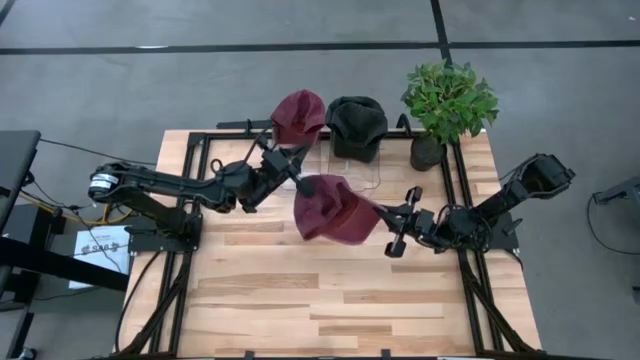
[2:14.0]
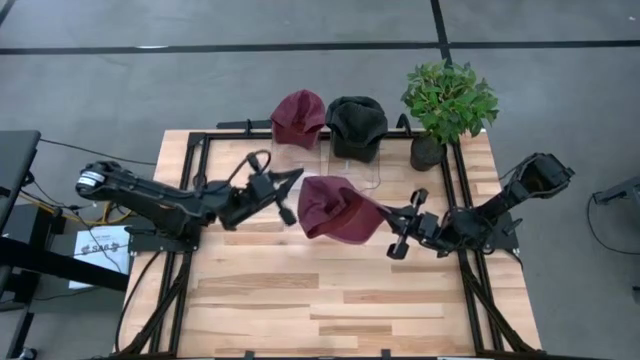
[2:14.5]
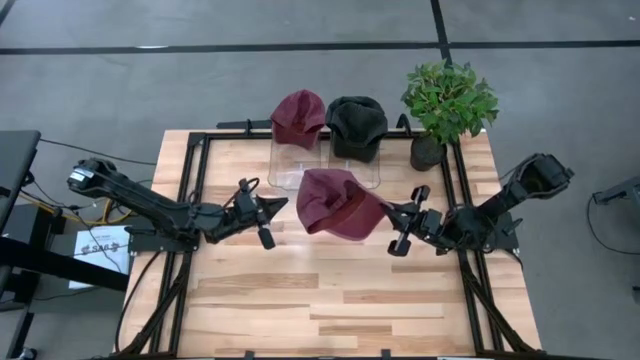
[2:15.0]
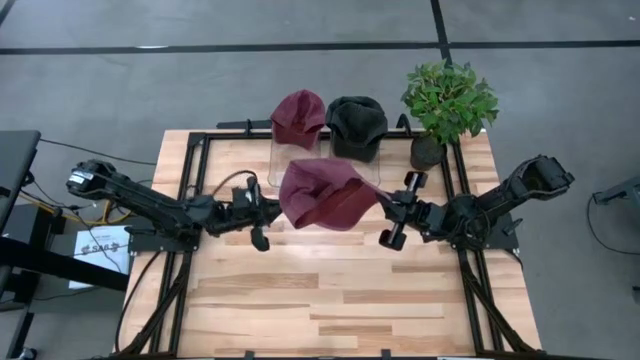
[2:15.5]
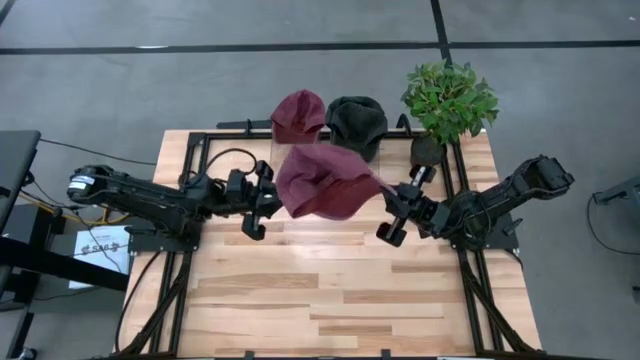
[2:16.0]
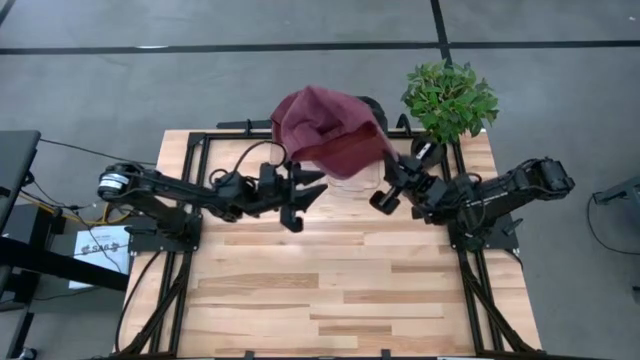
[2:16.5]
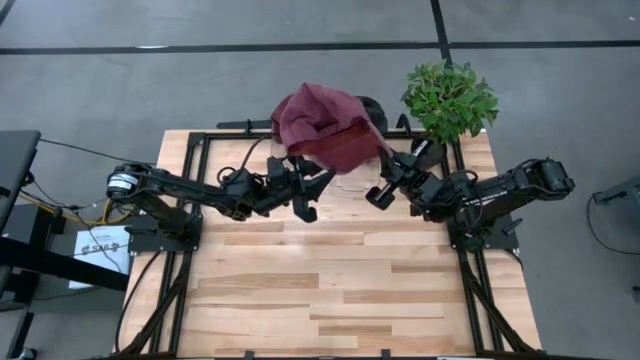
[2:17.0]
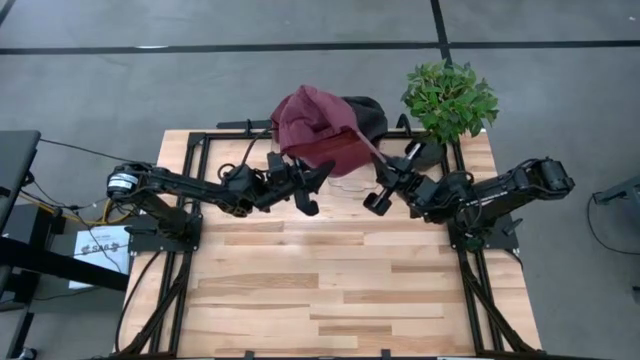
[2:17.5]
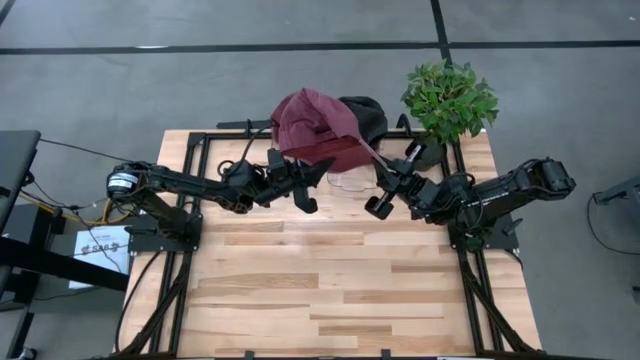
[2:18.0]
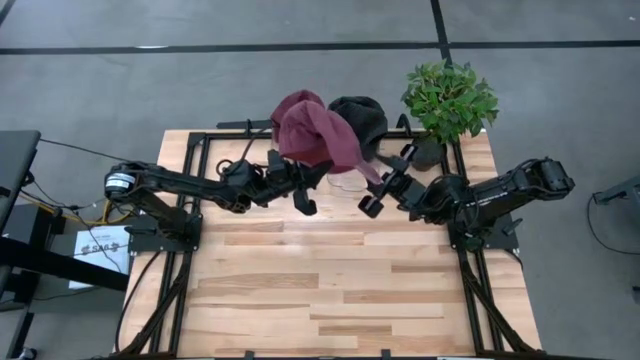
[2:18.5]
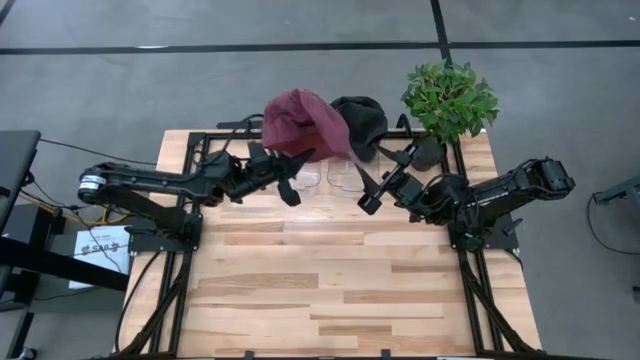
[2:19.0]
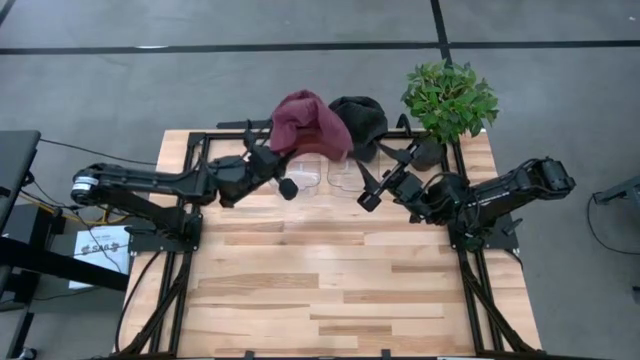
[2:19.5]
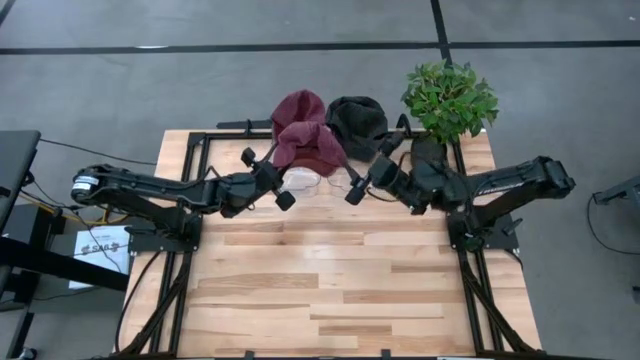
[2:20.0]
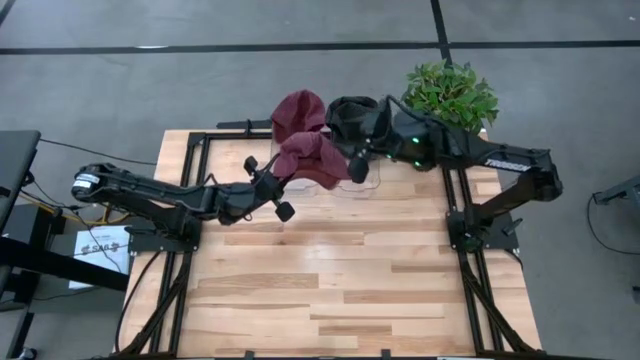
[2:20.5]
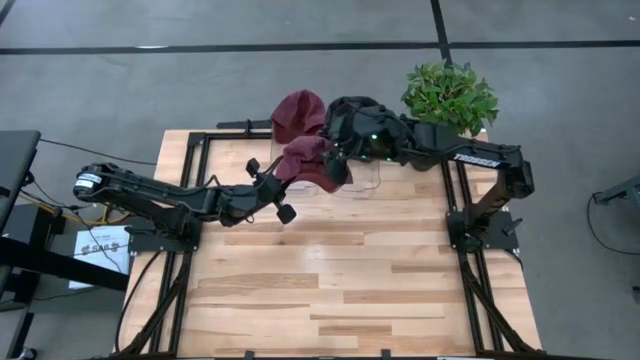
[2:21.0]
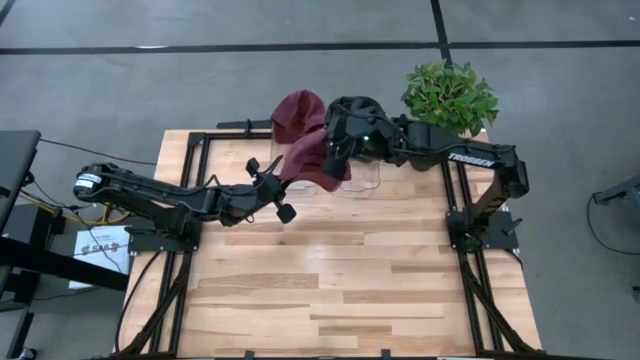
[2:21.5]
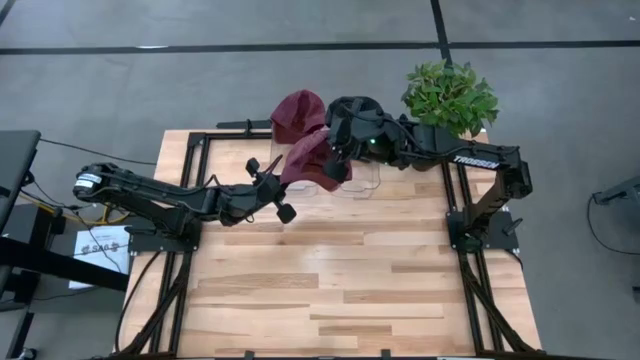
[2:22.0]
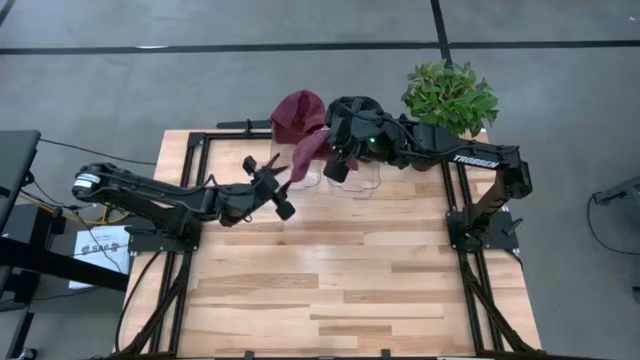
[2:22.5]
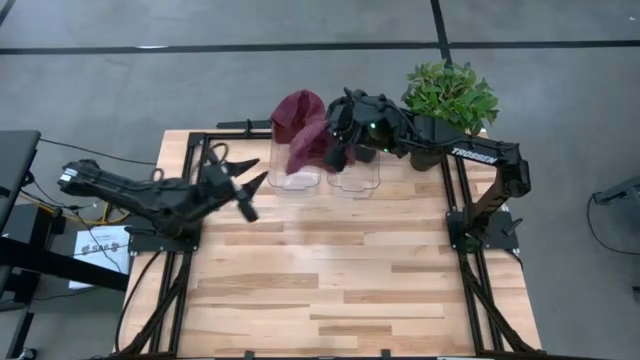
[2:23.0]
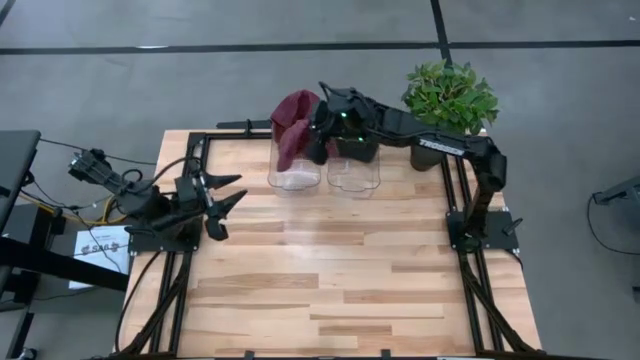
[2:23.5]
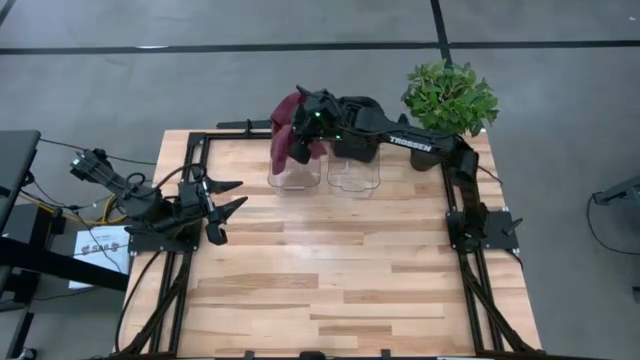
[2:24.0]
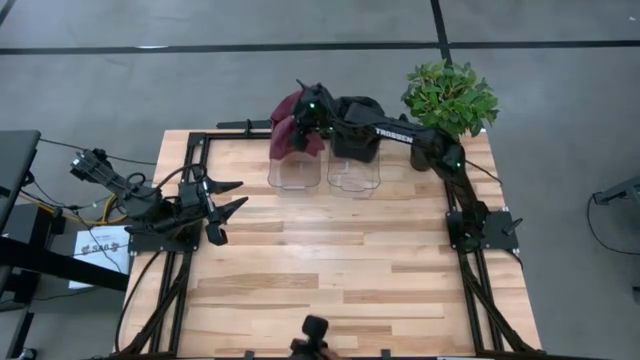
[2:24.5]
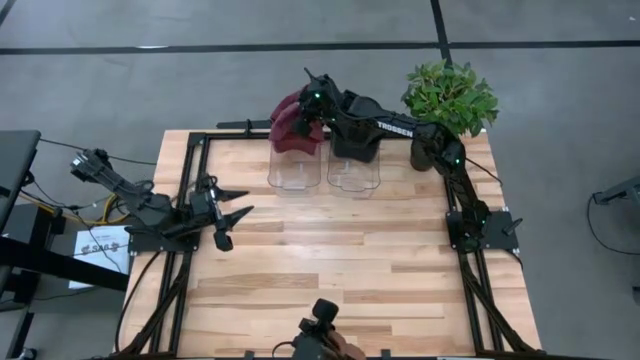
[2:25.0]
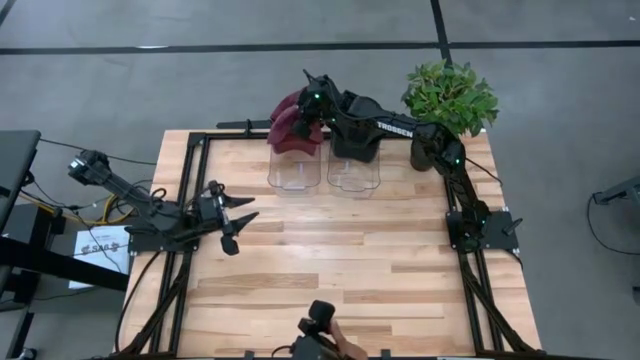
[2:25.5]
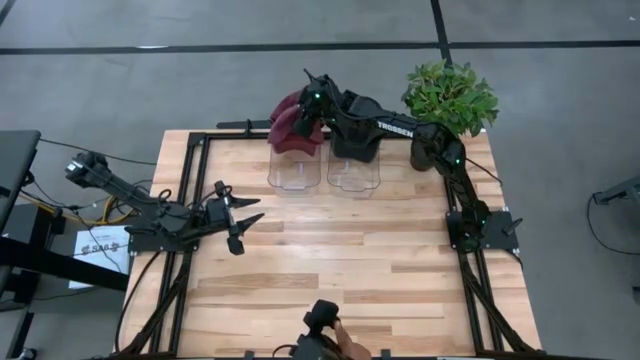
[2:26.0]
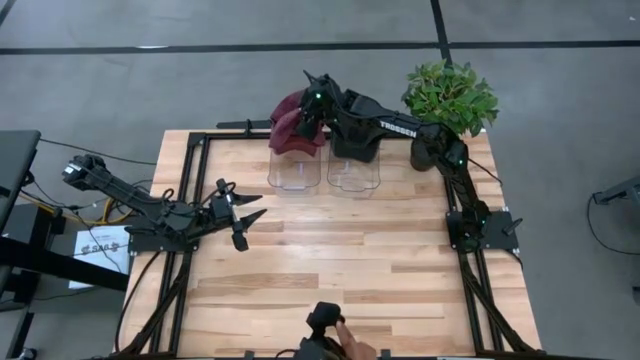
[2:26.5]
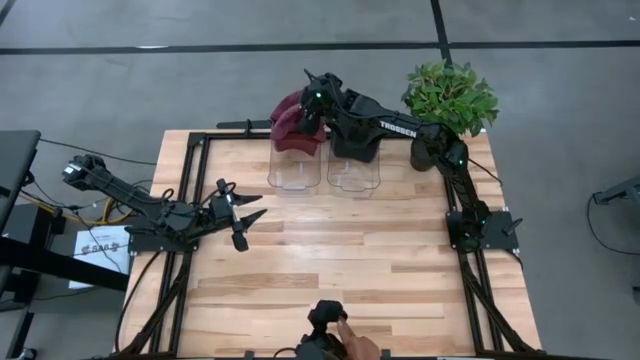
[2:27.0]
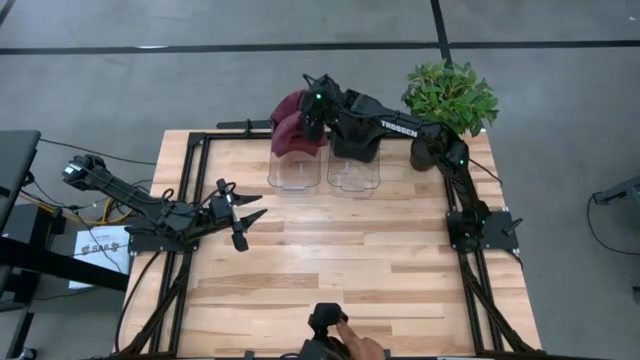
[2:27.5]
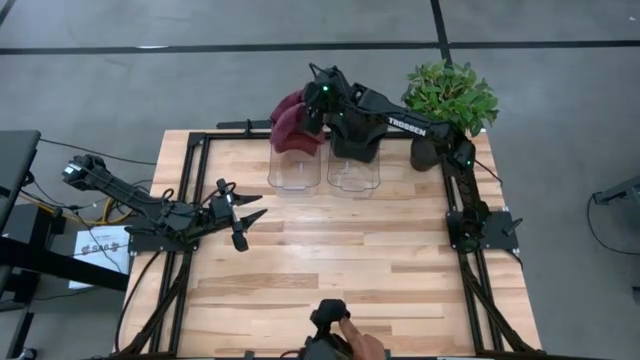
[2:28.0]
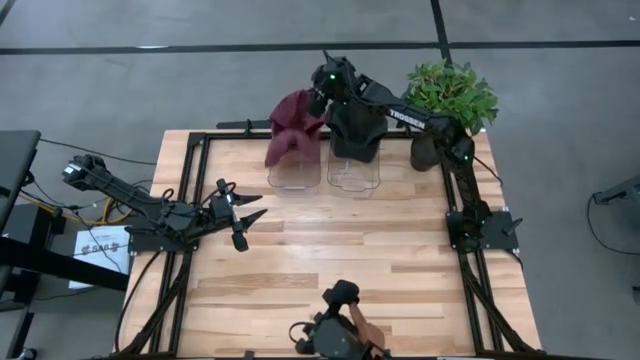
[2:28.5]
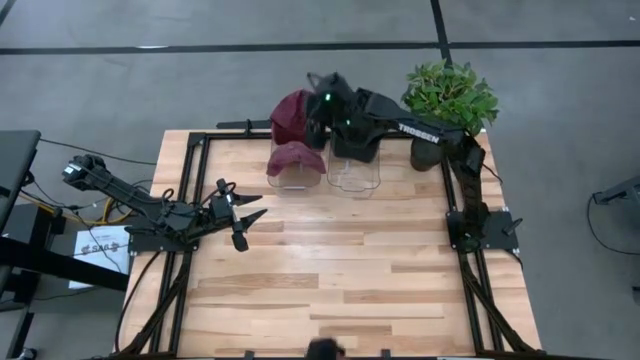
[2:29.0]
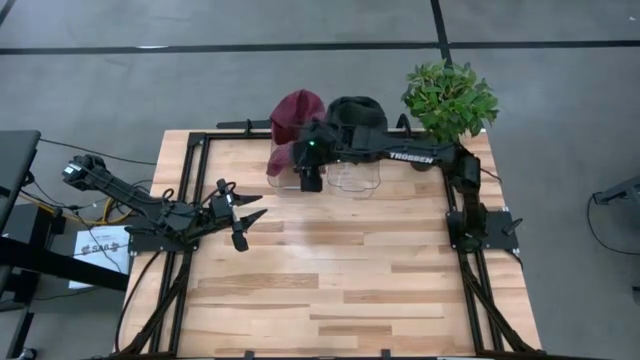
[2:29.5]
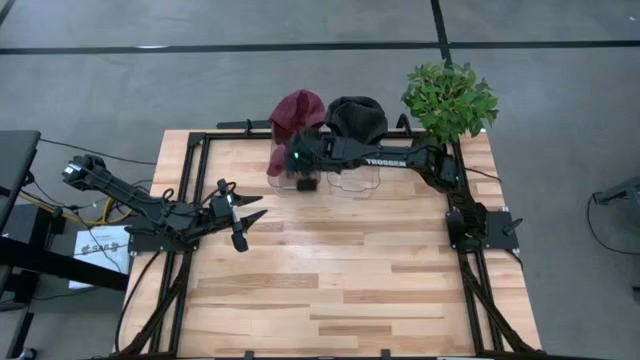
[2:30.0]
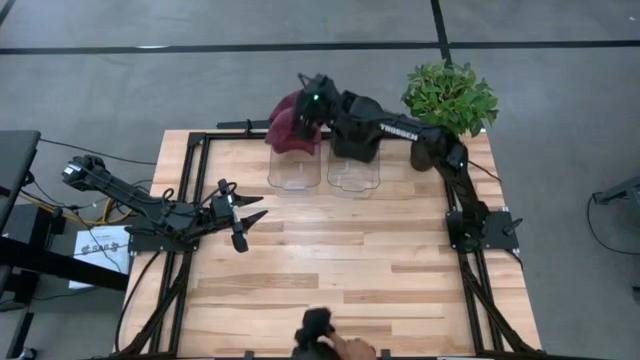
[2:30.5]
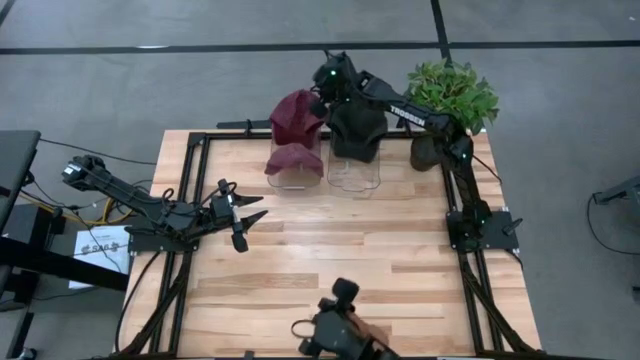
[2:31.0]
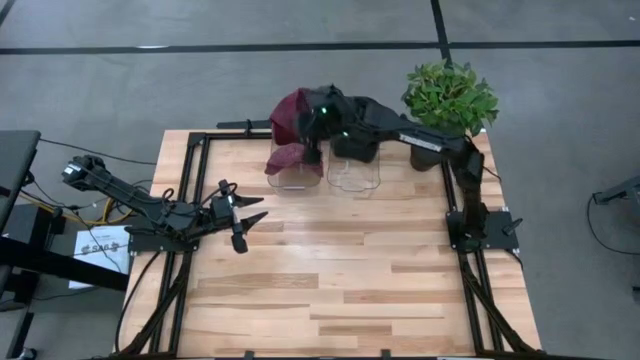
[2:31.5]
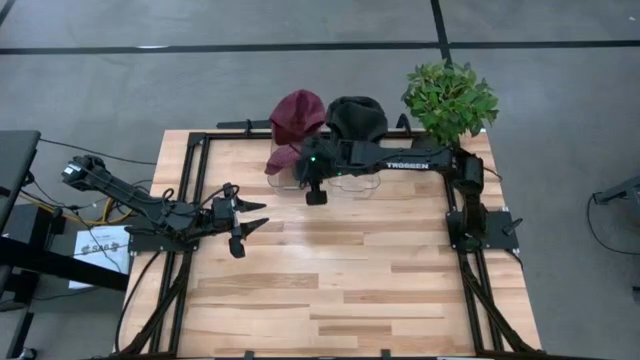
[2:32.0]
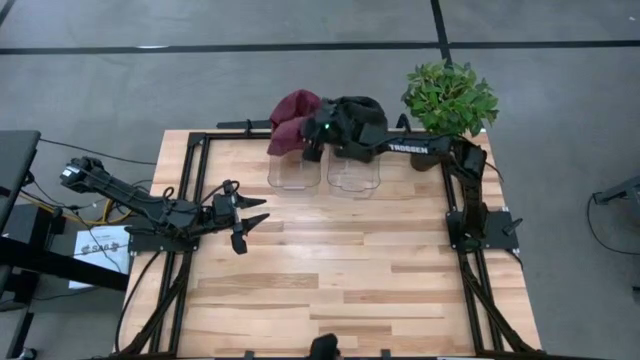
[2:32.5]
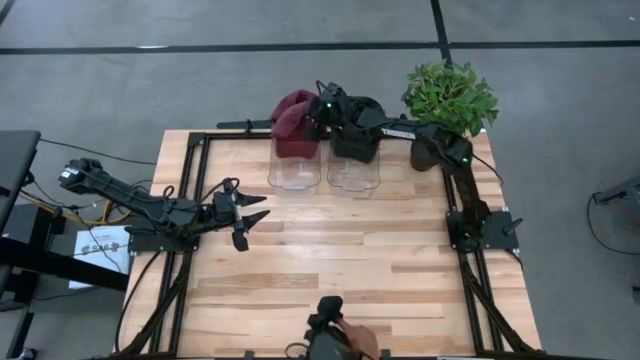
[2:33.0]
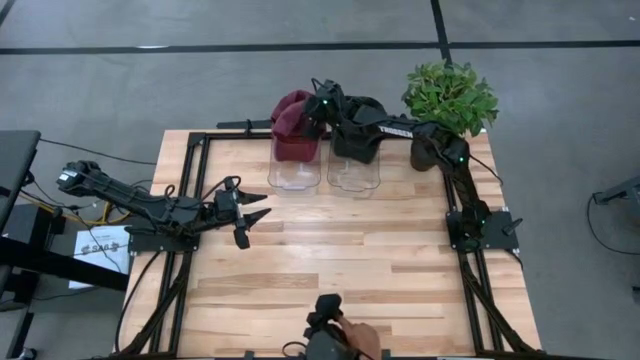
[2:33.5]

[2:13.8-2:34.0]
Task: Pick & Place hat
Put the red cap into the left transparent bin
